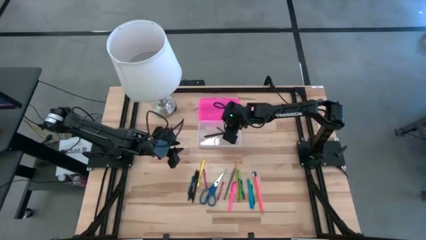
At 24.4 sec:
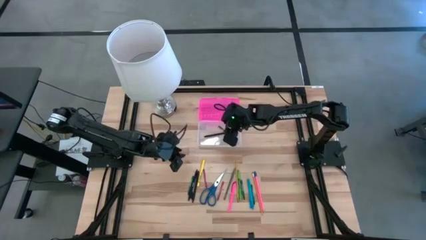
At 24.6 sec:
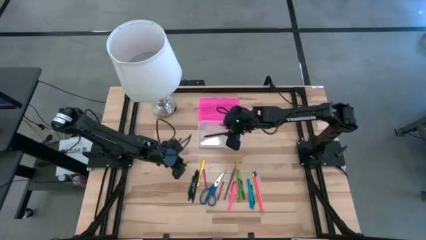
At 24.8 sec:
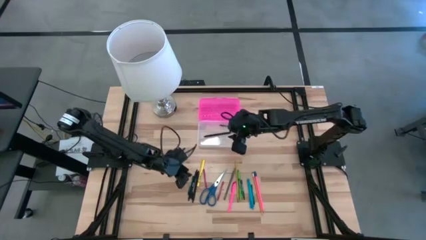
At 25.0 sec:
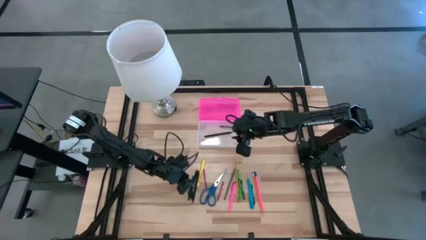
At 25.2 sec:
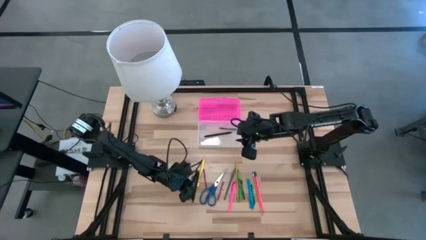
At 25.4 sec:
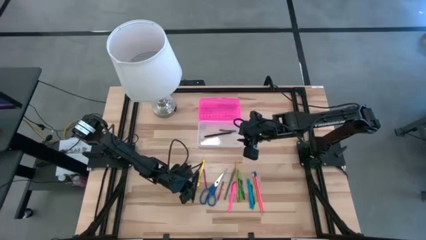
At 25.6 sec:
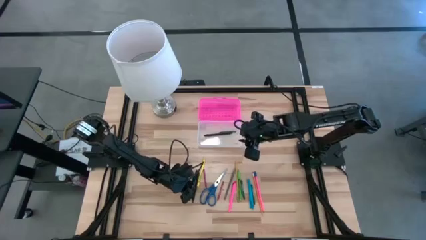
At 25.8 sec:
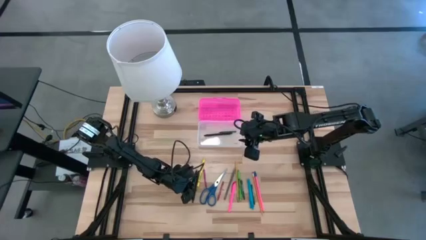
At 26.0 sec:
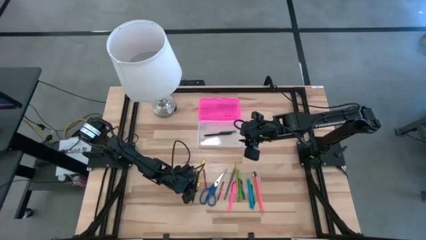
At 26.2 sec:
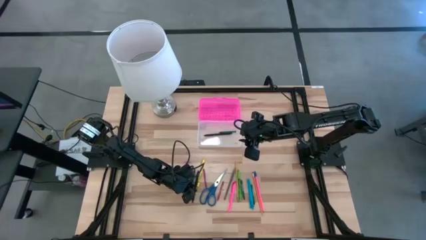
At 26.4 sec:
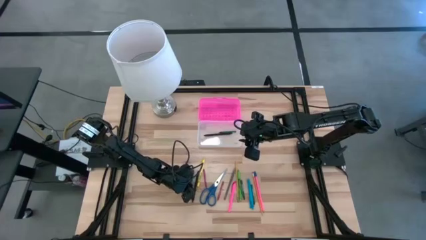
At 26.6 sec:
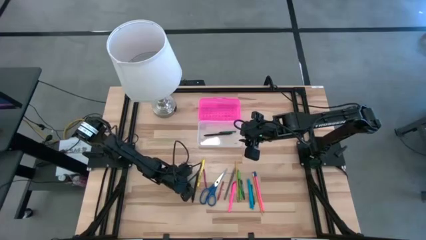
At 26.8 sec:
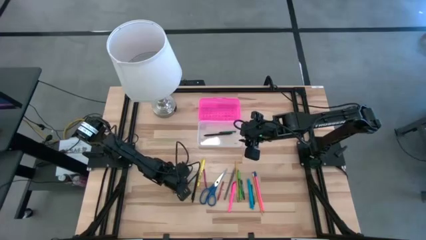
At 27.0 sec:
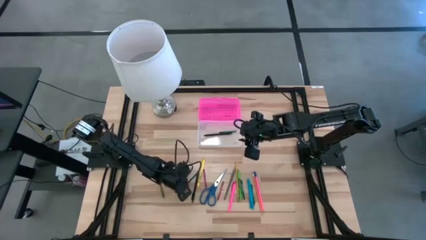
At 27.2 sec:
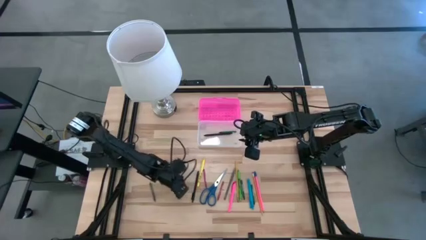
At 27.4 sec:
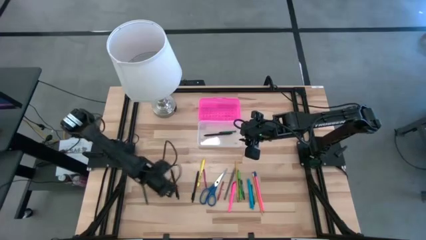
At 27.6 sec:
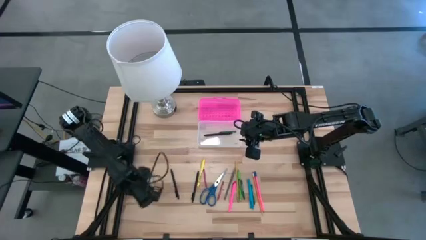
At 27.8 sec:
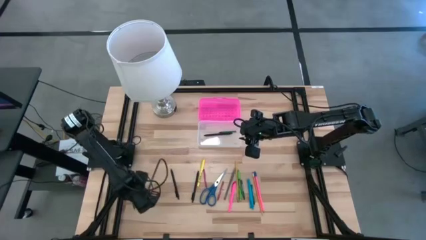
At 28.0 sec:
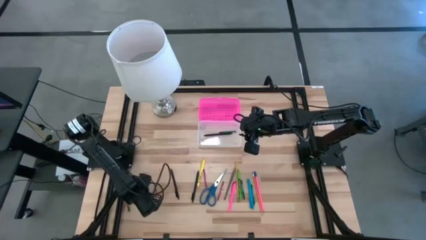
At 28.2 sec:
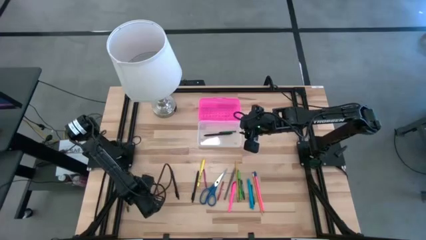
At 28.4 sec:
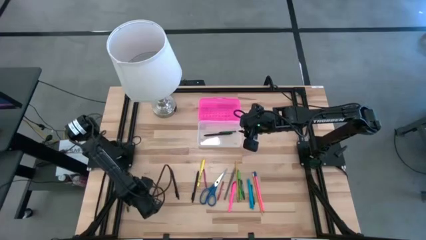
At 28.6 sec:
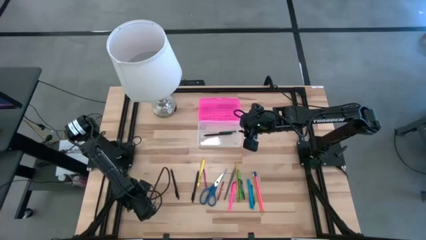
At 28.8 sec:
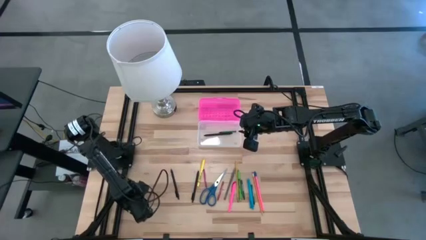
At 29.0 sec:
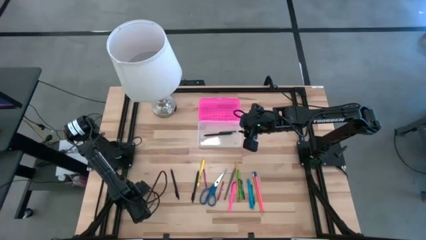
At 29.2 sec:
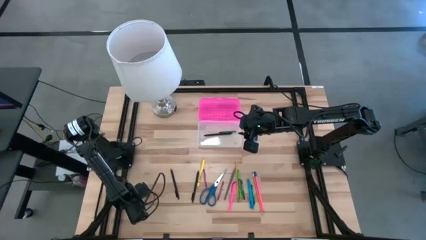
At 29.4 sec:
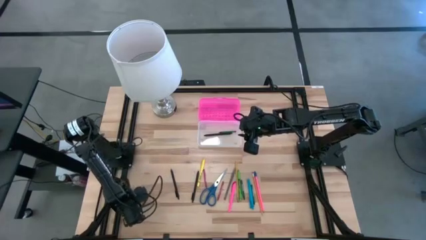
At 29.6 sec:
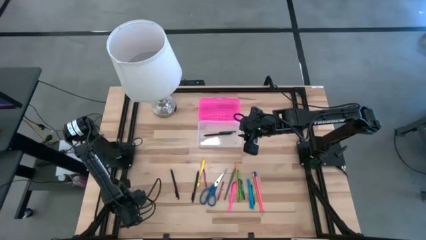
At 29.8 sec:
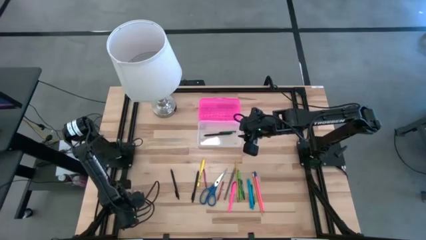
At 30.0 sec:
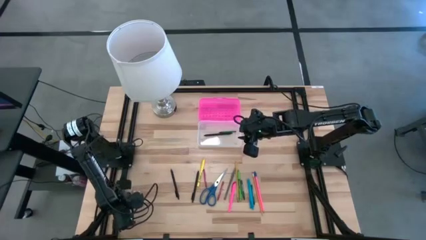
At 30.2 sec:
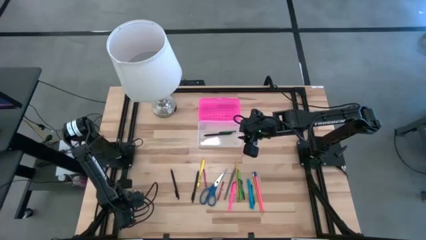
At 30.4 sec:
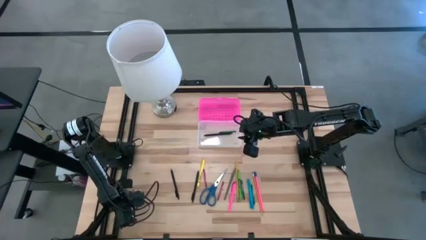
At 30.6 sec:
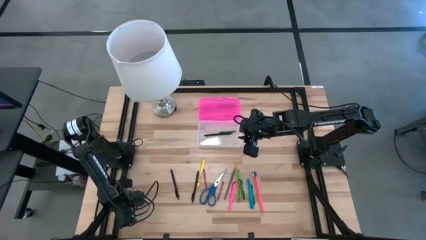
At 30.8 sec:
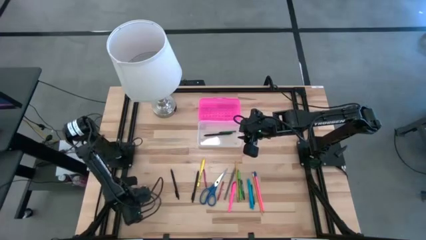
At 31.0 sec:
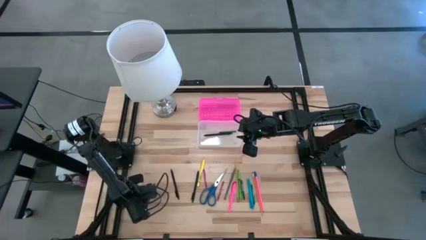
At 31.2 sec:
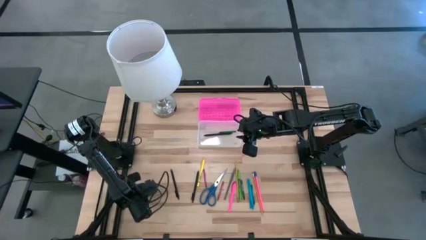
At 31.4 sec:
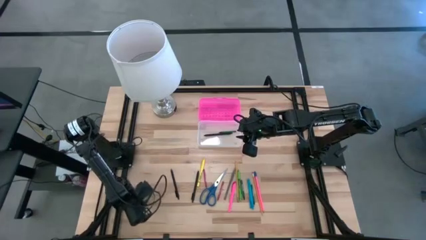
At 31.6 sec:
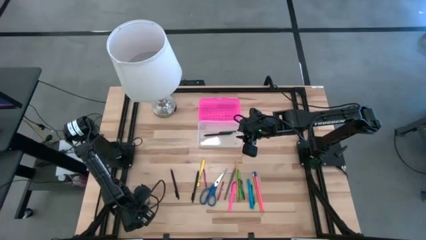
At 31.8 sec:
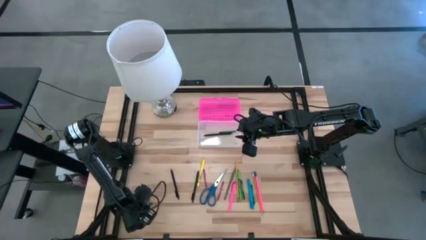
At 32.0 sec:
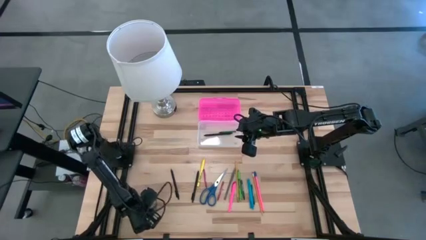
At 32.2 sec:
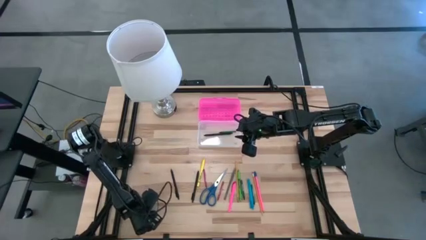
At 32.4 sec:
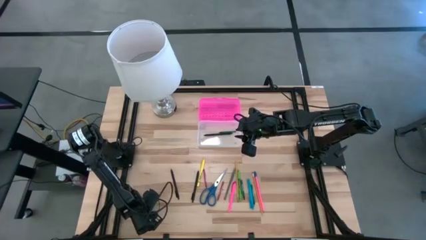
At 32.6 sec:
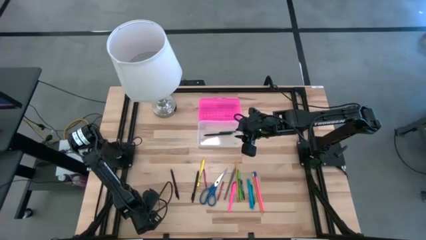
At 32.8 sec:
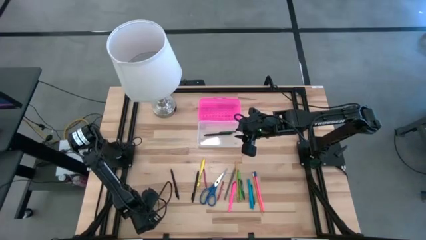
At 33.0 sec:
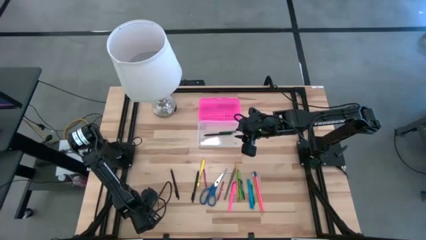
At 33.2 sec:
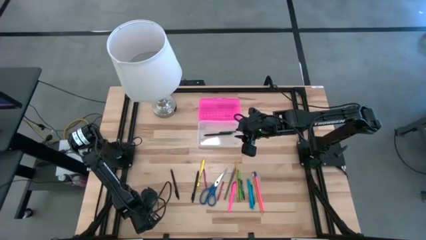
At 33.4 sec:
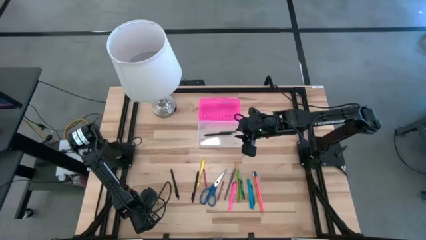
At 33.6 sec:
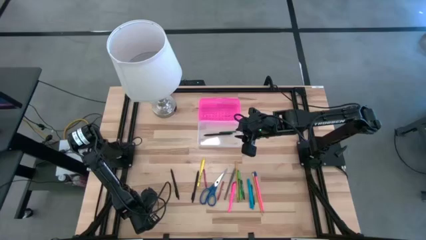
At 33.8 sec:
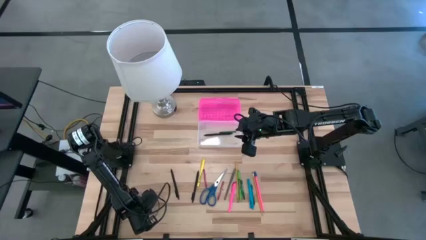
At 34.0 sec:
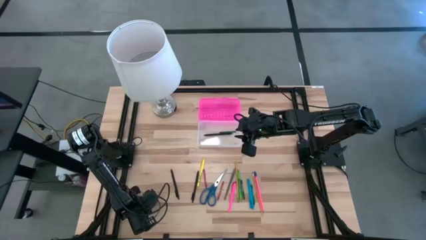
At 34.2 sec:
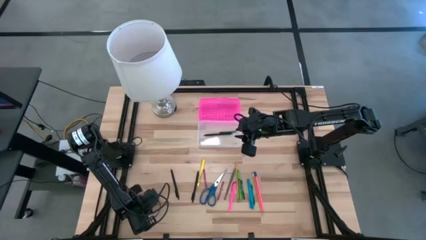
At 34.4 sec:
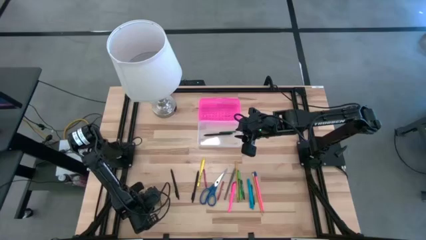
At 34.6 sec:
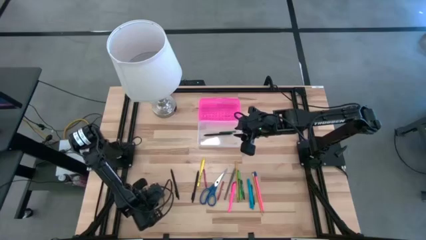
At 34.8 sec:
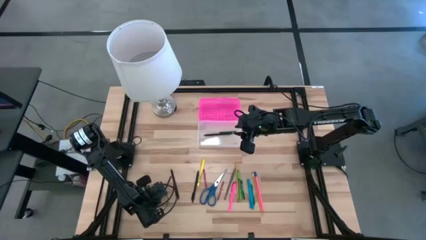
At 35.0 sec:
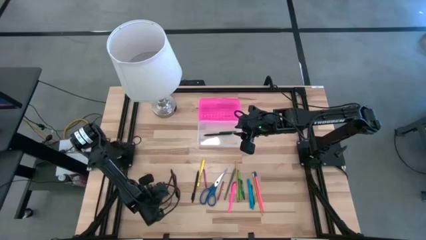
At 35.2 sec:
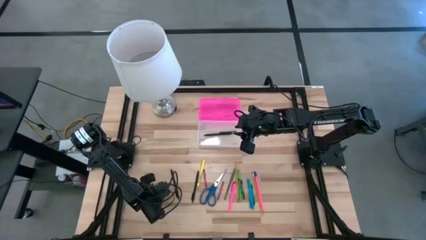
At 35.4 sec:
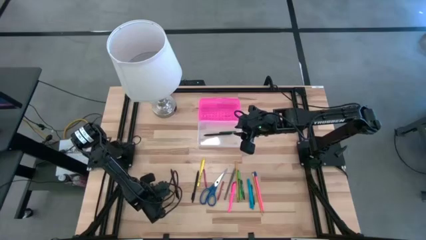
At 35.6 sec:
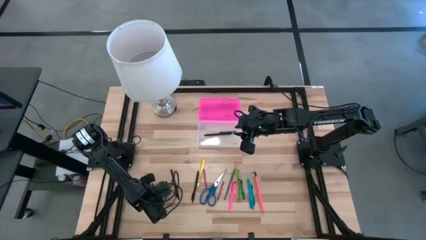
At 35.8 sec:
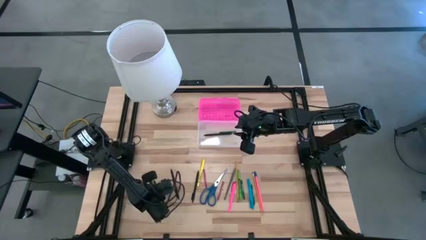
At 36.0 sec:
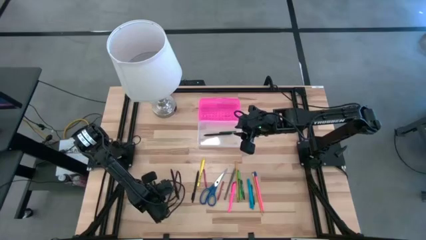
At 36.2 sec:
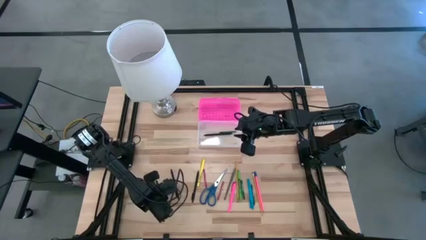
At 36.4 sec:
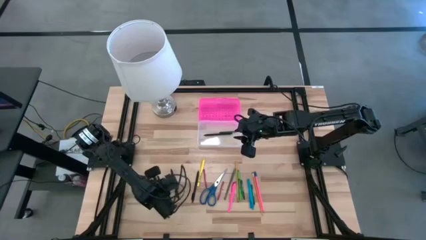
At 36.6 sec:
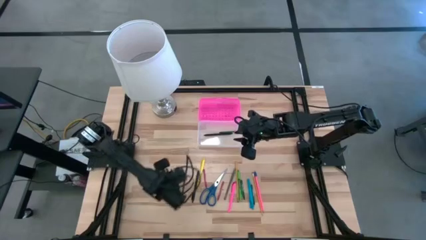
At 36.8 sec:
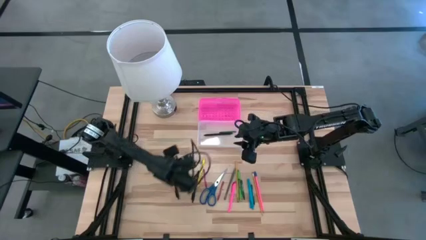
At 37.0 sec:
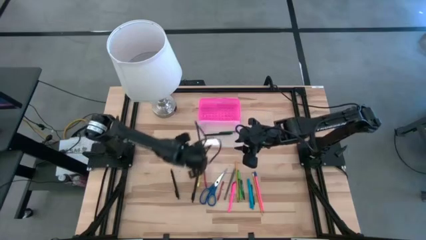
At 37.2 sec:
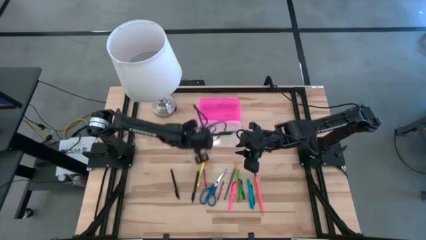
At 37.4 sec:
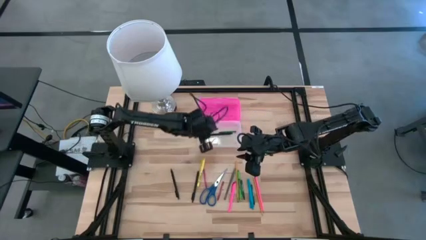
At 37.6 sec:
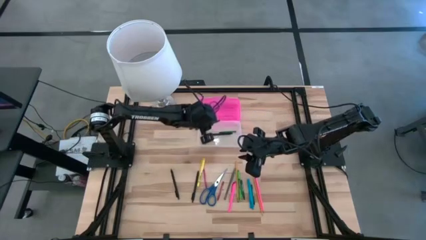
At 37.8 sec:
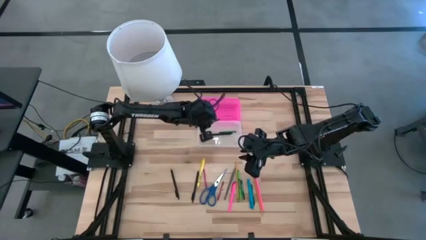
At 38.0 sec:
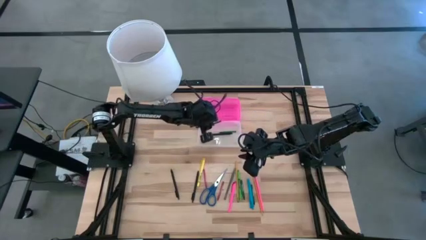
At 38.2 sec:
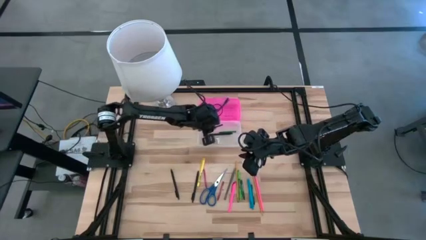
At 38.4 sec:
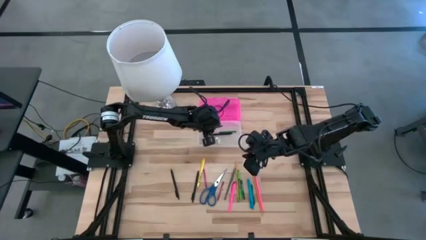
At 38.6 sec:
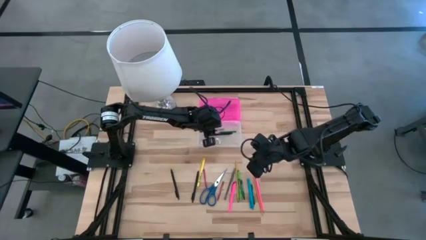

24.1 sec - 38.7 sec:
Task: Pick & place school supplies into a supply box
Put the left green crayon into the pink supply box

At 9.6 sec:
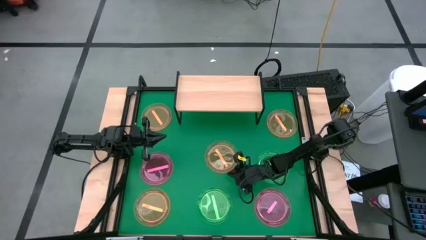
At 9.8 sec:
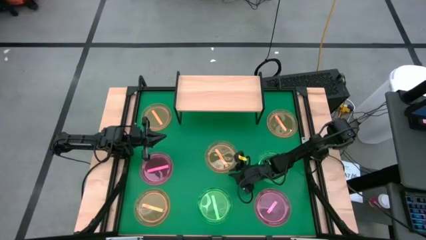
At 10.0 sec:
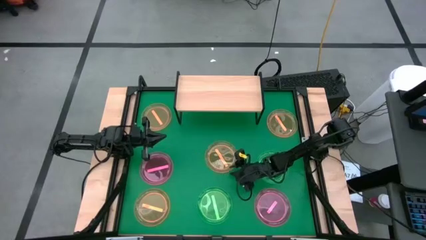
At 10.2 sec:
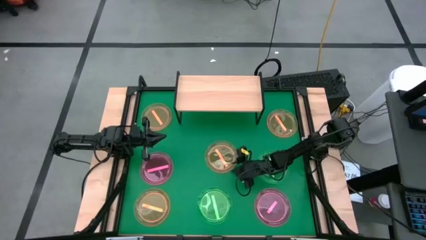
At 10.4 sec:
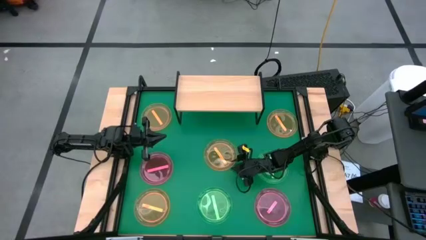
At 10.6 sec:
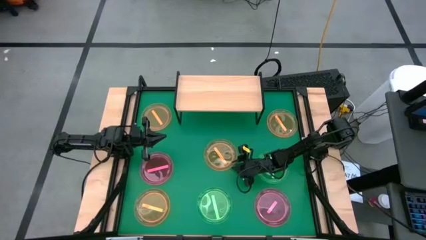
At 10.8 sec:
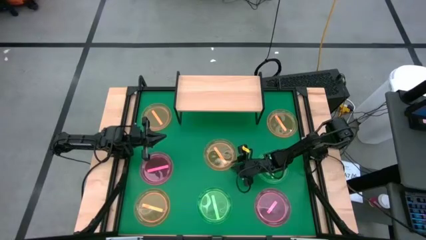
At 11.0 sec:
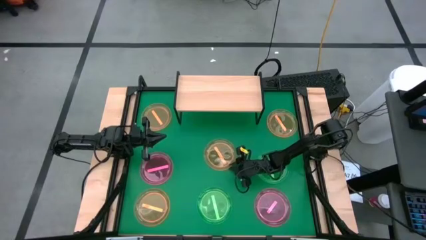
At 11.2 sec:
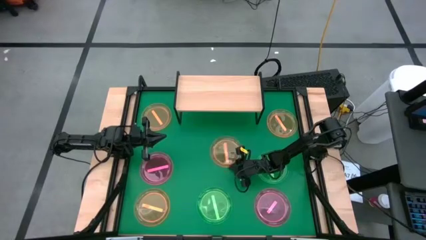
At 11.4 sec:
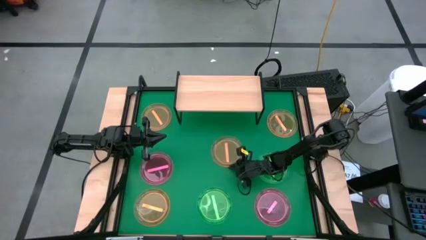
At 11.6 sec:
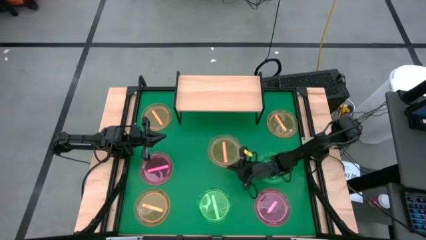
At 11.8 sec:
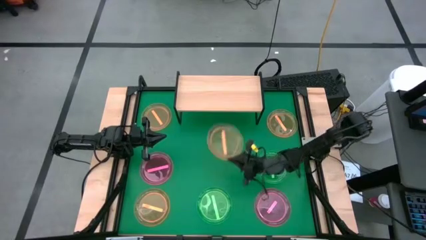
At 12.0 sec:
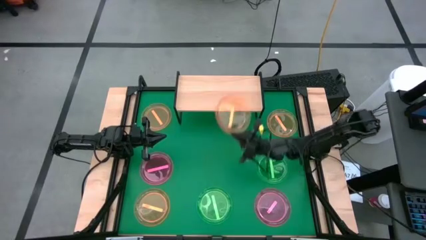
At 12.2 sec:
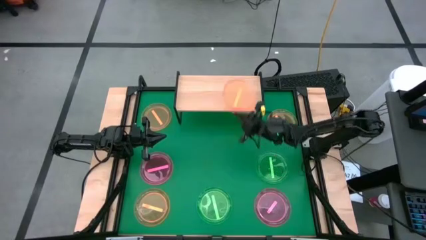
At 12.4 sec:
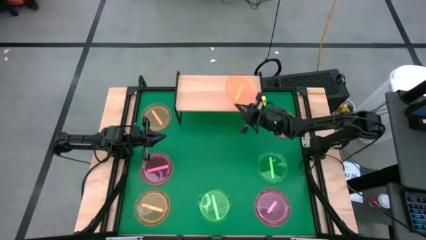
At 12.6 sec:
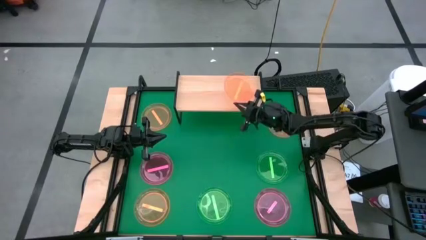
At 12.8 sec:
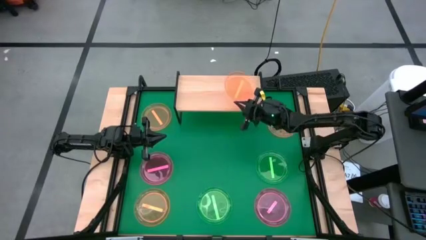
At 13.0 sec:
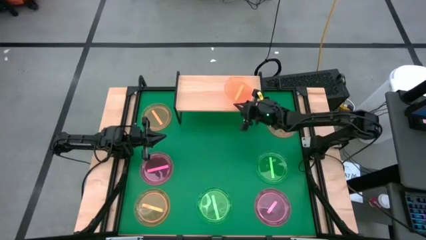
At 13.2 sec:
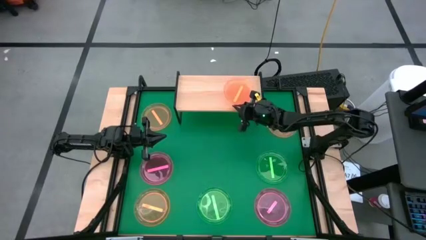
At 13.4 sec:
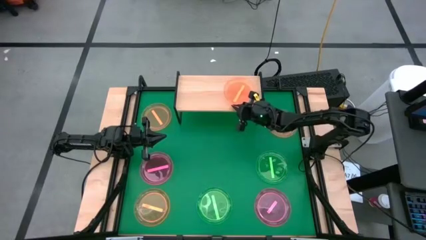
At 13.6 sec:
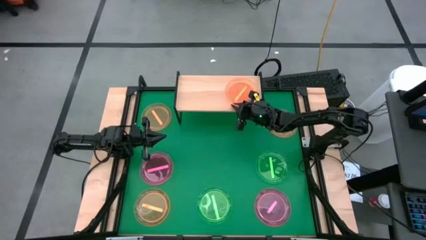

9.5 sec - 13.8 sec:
Task: Place and stack plates onto a shelf
Put the orange plate on the shelf
